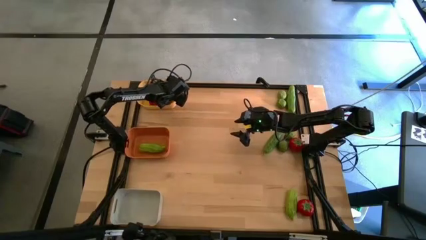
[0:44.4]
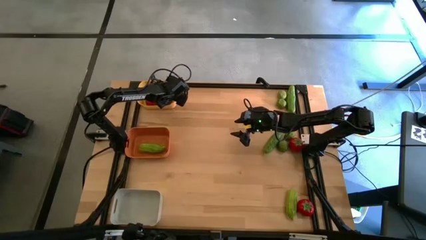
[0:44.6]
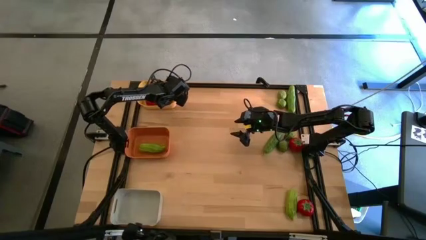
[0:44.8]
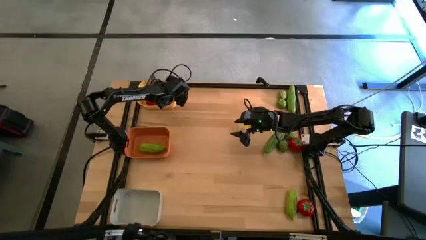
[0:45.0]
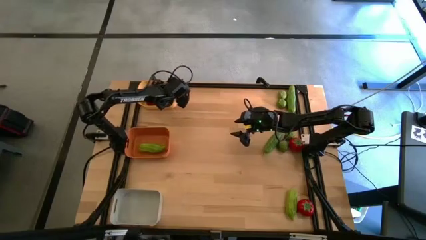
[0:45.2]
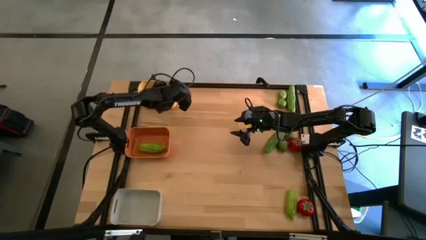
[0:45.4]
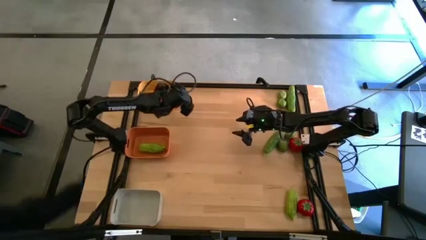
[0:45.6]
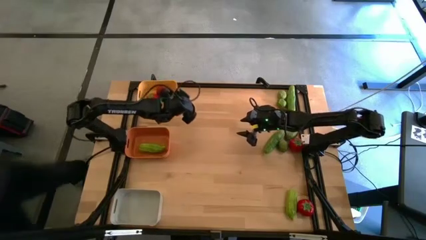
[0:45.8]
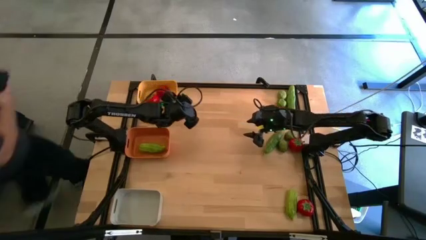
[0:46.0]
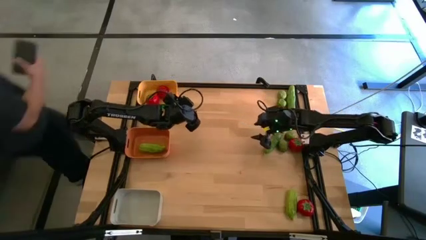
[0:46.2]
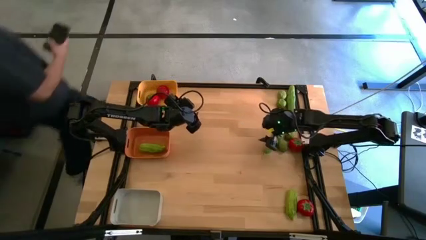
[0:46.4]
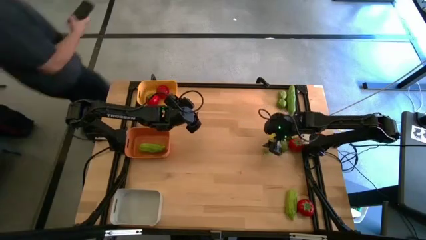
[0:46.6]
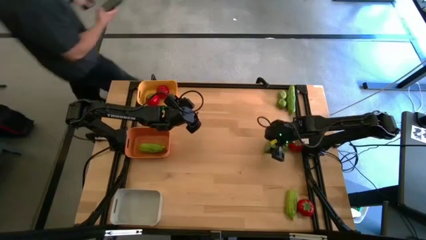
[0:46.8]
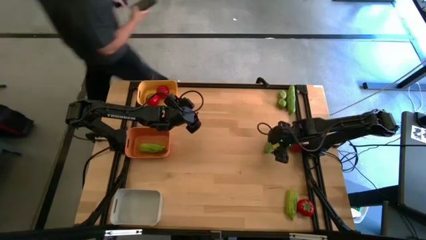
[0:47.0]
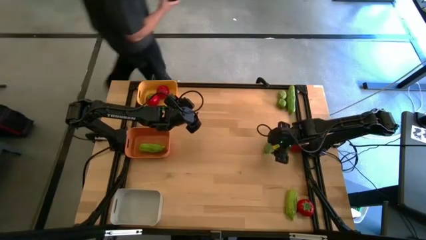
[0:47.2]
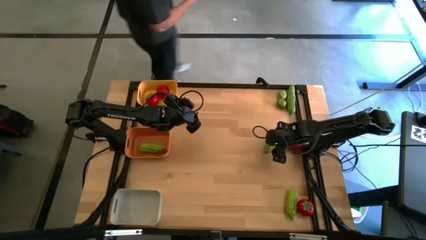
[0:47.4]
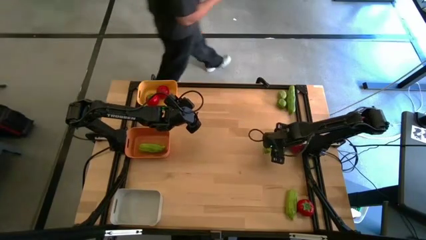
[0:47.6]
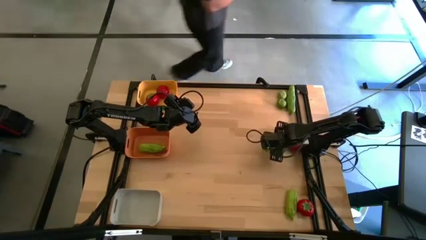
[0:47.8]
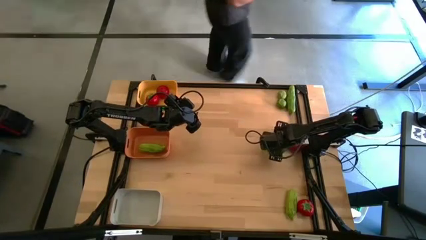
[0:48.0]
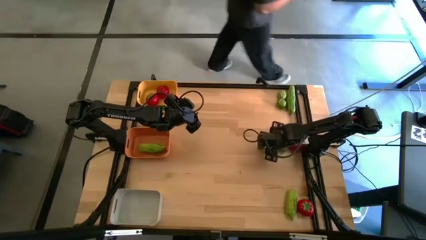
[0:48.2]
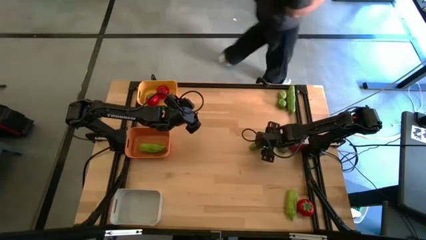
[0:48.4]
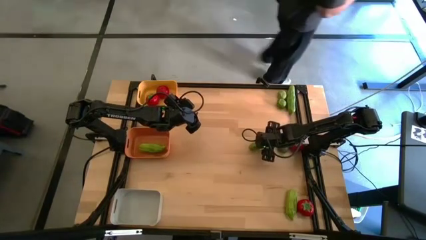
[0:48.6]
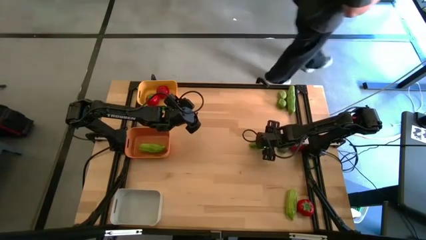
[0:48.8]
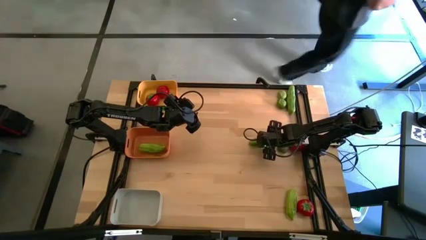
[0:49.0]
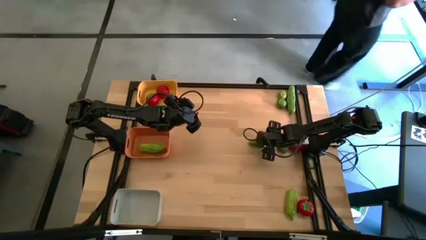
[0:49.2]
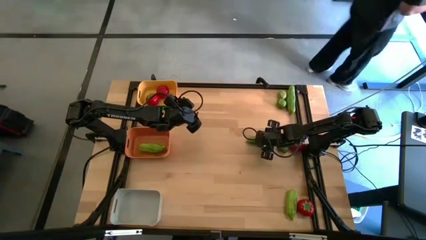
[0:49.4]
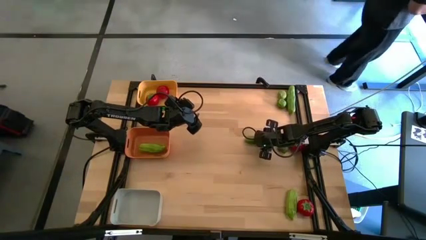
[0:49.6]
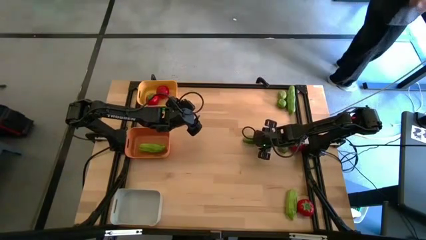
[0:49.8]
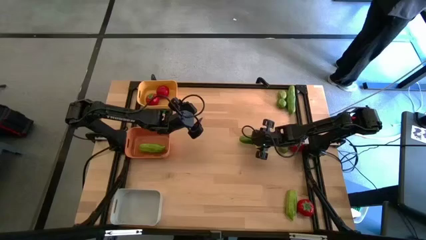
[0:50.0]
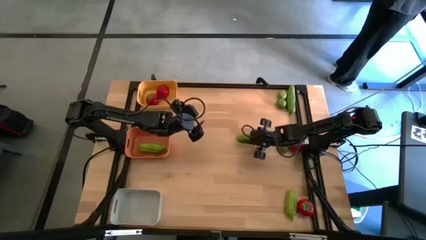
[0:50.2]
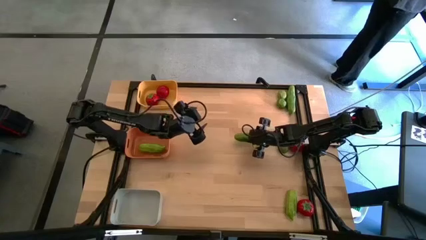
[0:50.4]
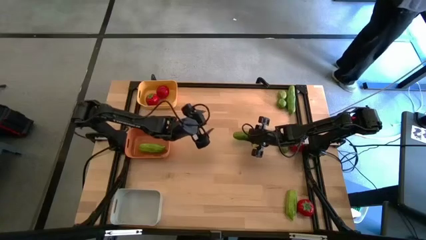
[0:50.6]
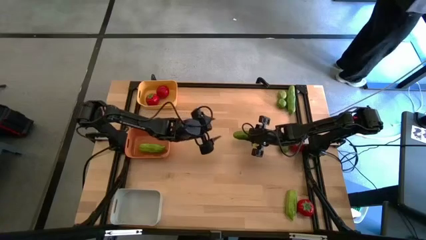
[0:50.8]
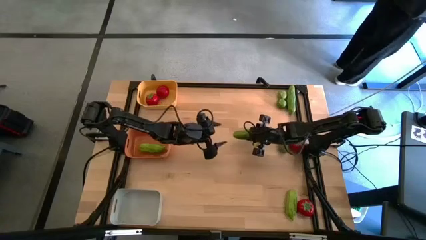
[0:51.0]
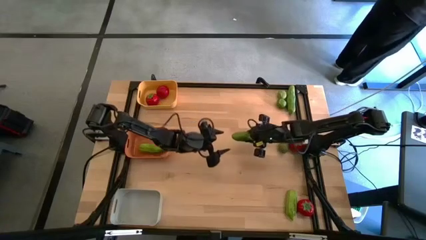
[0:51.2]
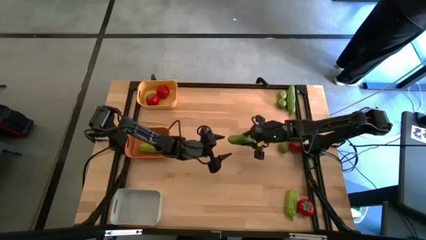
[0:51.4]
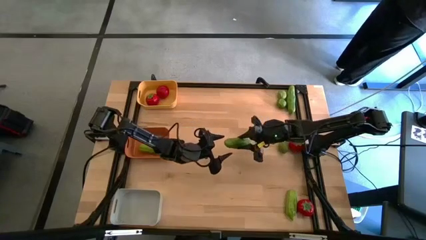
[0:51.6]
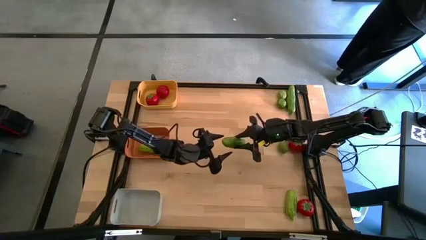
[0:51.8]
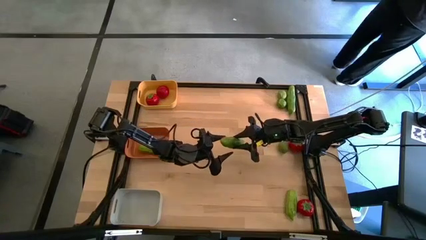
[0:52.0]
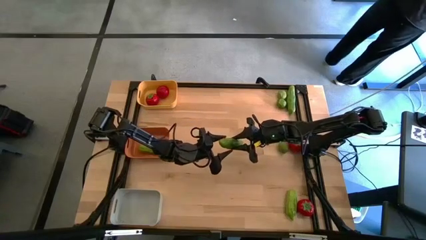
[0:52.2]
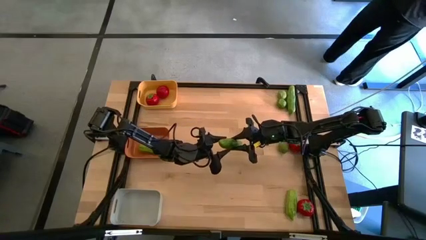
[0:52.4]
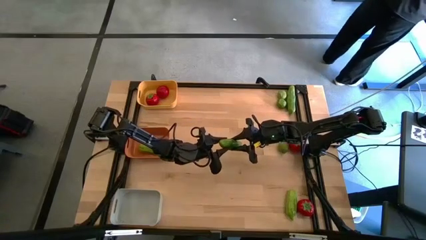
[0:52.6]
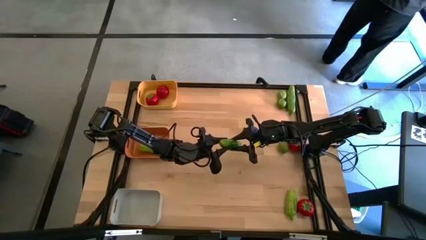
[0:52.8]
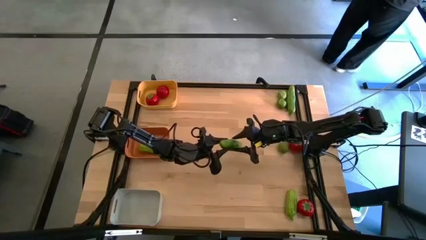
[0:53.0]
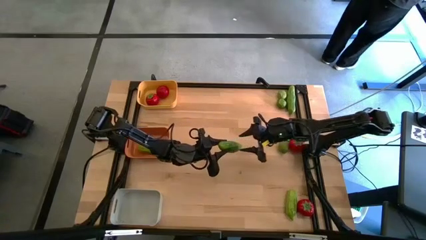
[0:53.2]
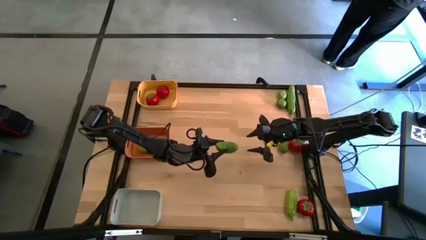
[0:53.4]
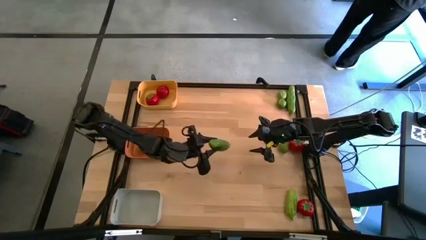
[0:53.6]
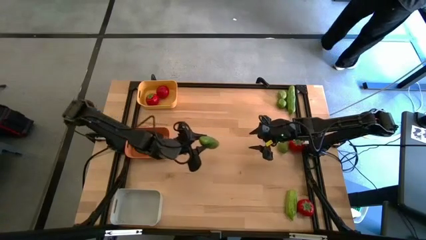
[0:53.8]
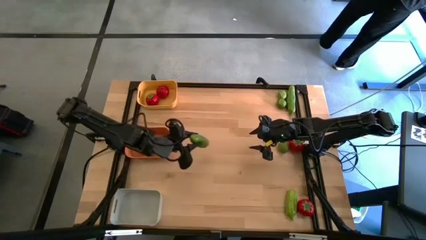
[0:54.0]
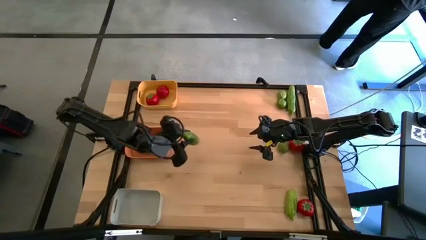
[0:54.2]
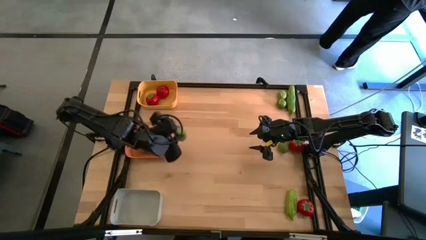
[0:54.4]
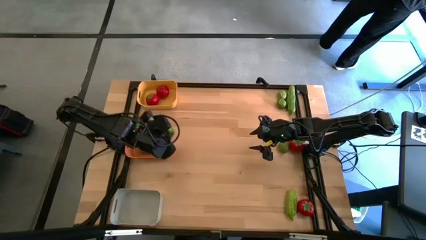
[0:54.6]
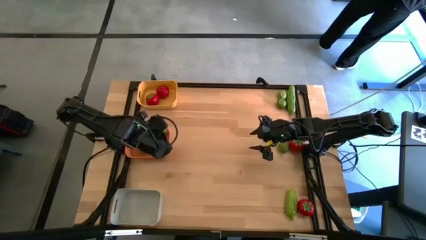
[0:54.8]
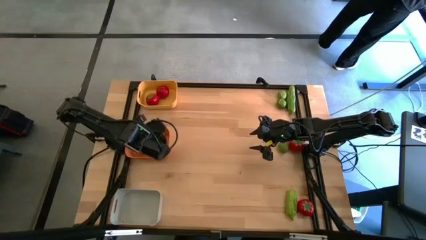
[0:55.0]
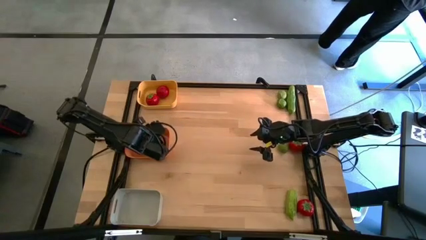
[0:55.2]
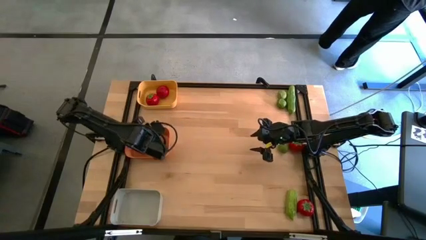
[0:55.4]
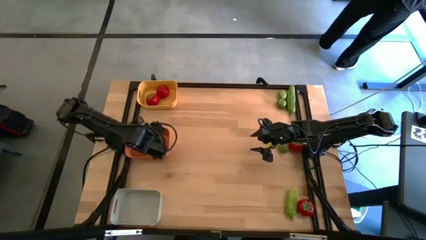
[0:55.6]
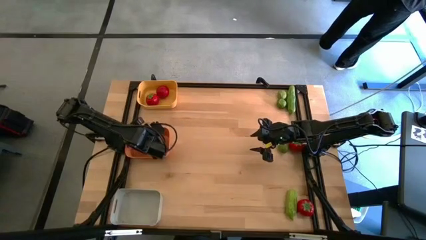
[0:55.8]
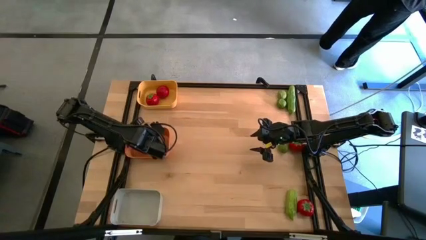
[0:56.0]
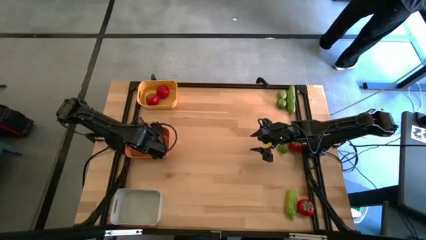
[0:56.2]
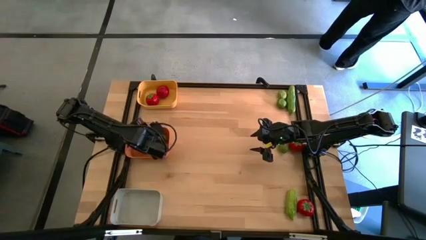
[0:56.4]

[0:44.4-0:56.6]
Task: Sort produce into baskets
Put the cucumber into the orange bin

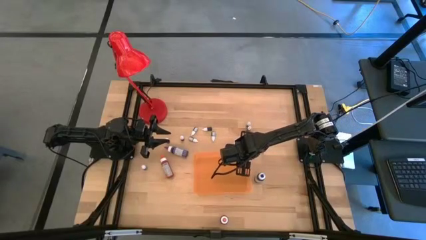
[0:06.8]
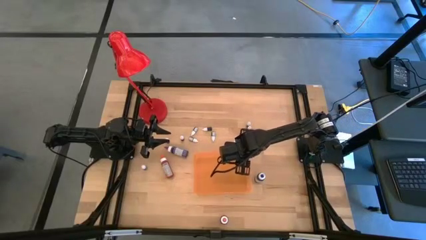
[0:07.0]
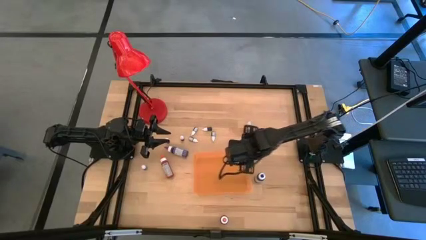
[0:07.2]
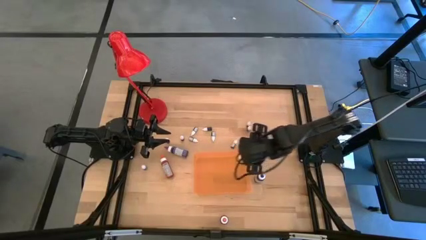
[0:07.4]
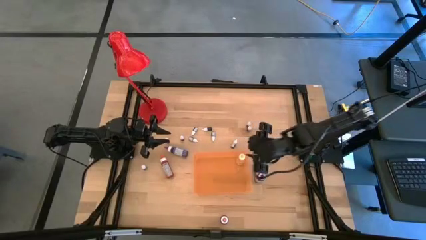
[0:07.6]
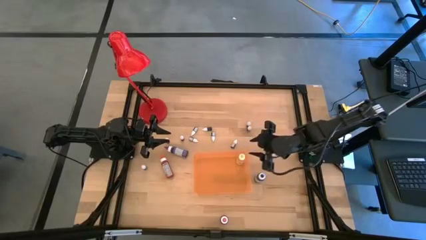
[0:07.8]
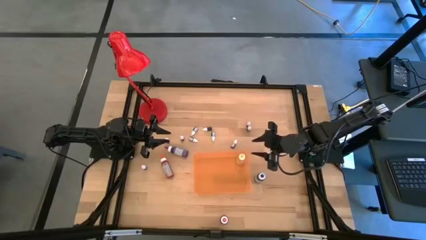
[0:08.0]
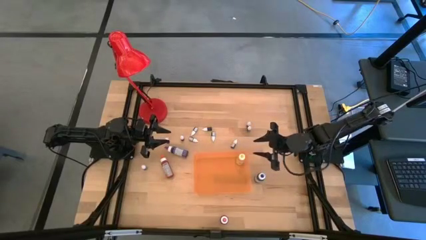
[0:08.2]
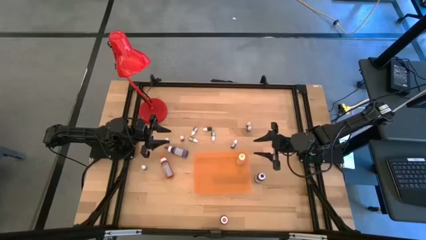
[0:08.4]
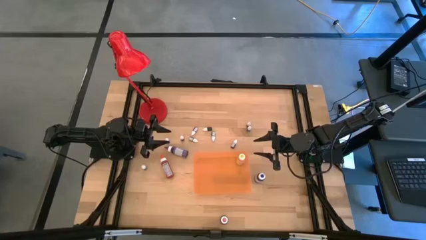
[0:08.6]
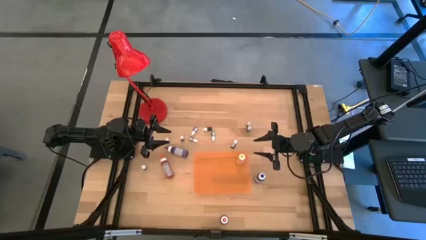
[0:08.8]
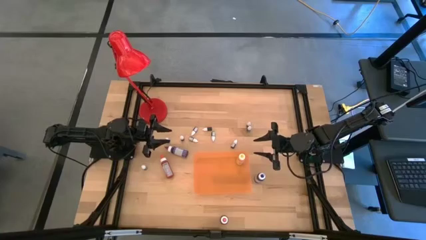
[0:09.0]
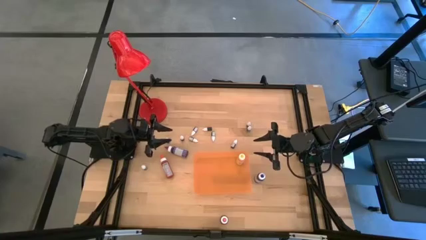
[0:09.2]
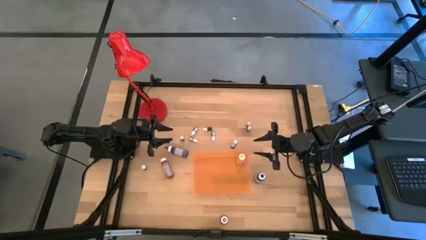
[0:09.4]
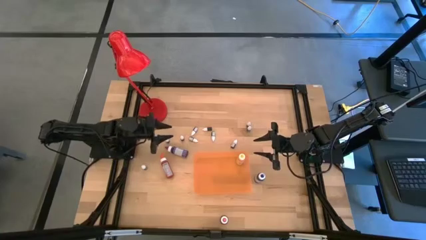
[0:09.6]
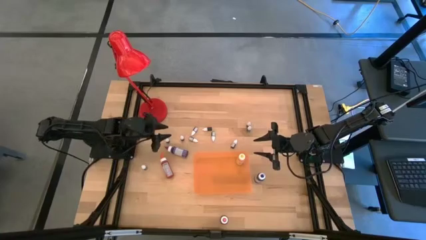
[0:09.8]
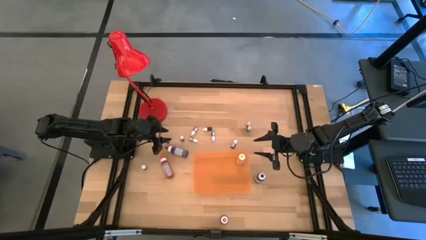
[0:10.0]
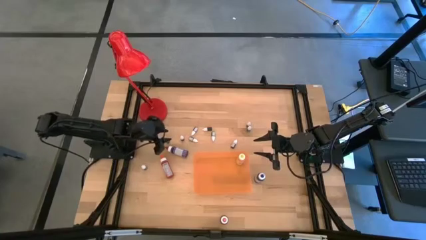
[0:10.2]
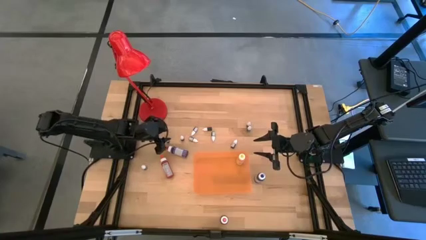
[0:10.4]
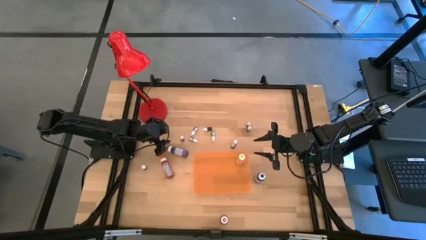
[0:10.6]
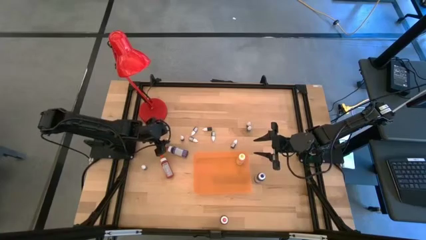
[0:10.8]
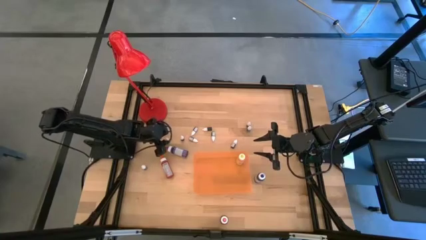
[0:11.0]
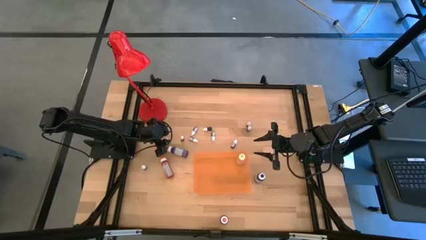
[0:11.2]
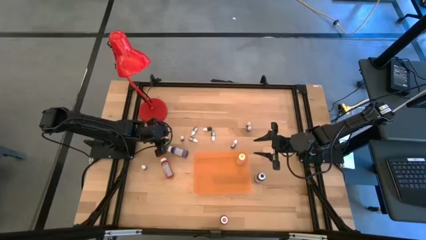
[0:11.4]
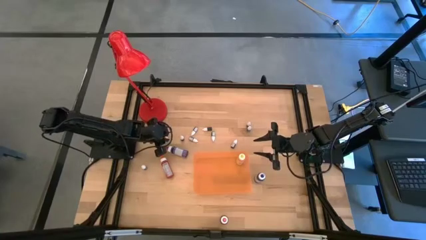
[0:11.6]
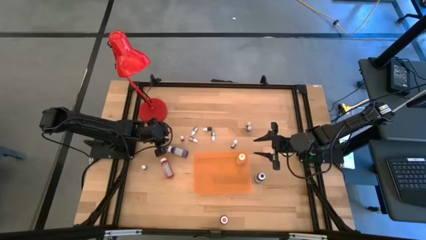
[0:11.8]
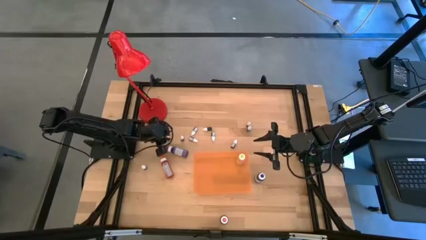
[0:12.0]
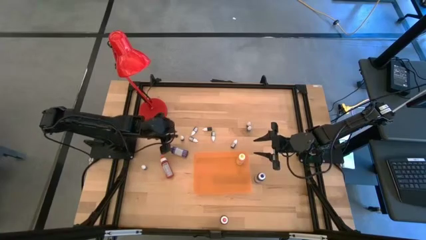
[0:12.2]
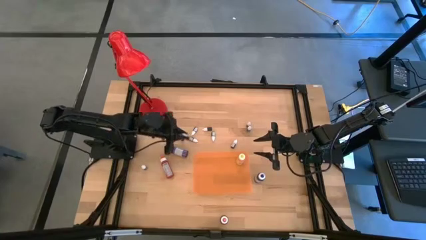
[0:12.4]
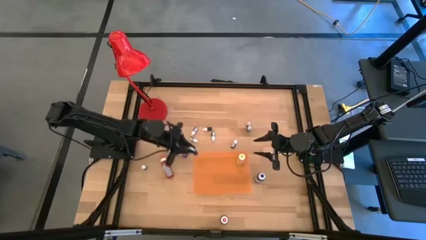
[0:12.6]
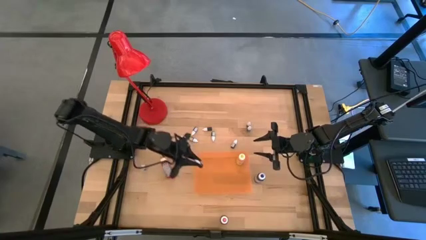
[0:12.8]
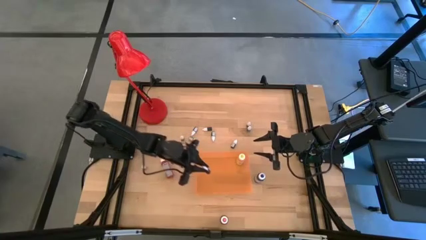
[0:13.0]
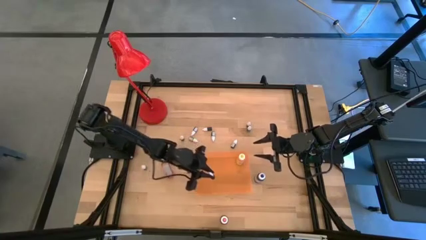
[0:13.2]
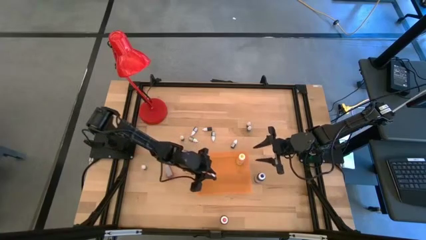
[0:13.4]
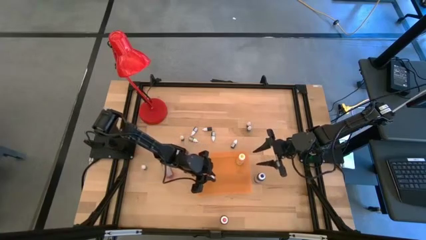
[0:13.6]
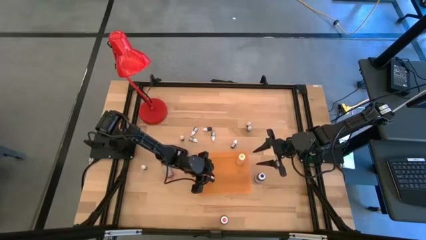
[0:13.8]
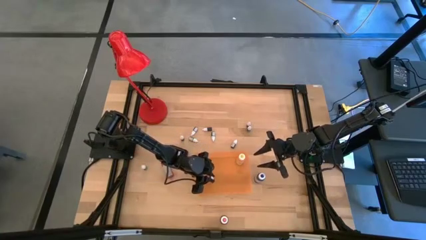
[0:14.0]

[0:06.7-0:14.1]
Task: Pick & Place food coloring
Put the small purple food coloring bottle into the orange bin
